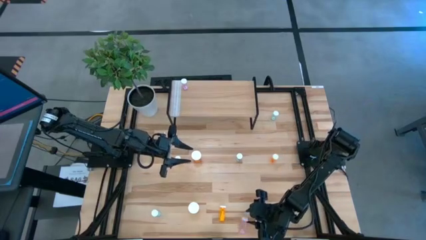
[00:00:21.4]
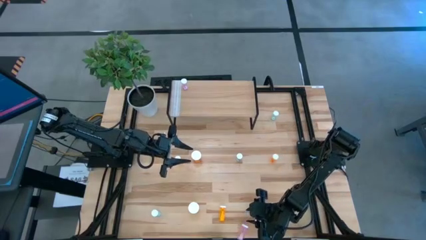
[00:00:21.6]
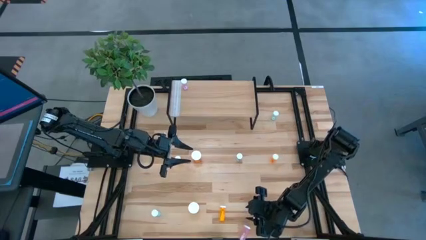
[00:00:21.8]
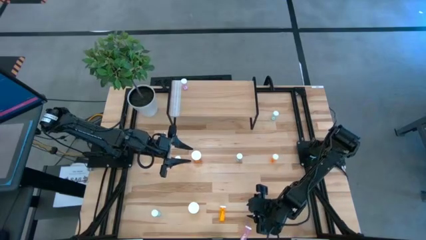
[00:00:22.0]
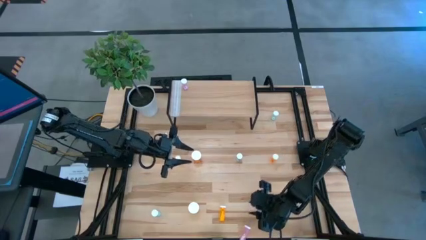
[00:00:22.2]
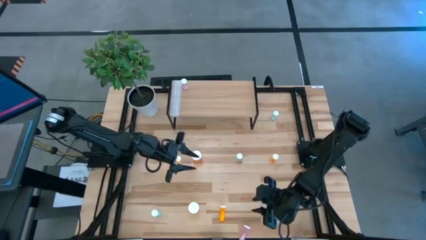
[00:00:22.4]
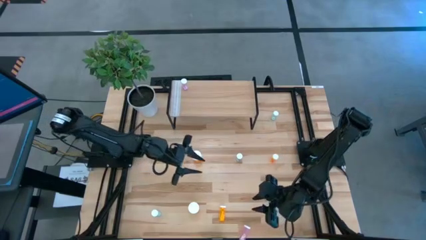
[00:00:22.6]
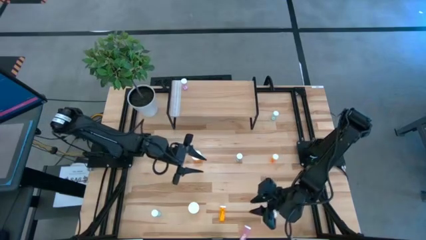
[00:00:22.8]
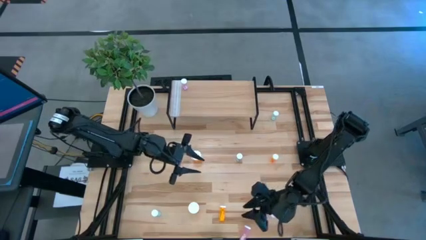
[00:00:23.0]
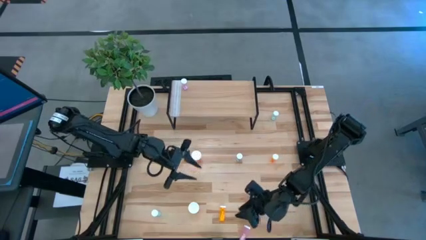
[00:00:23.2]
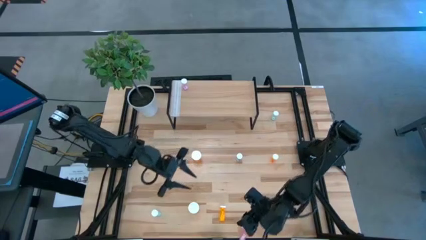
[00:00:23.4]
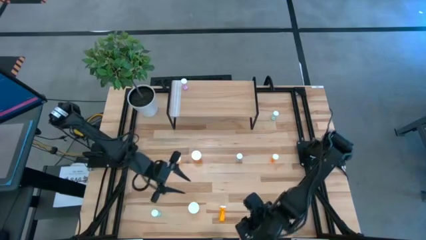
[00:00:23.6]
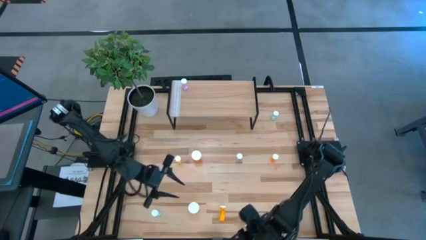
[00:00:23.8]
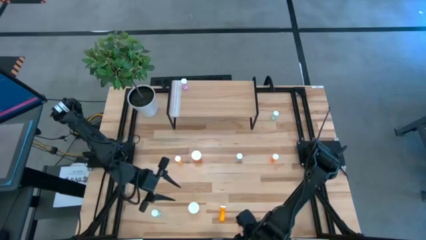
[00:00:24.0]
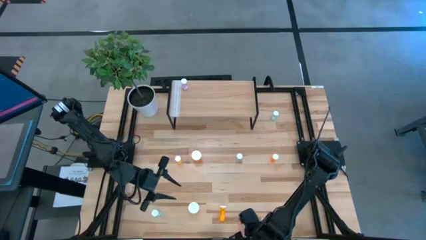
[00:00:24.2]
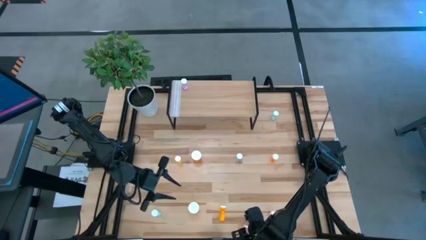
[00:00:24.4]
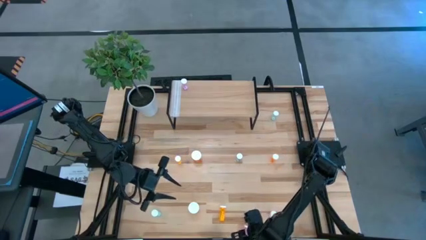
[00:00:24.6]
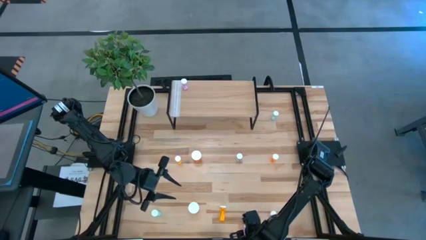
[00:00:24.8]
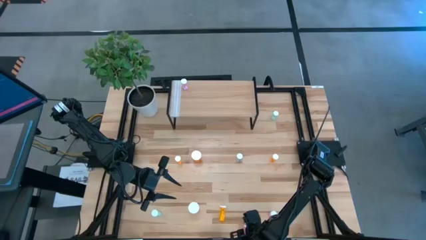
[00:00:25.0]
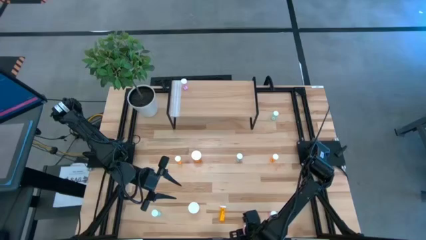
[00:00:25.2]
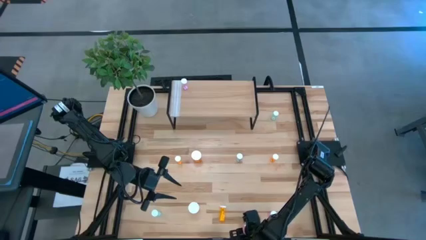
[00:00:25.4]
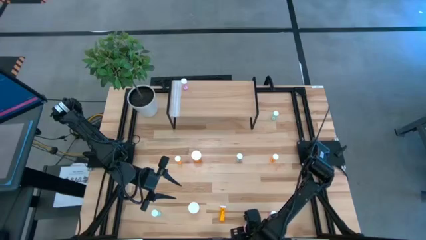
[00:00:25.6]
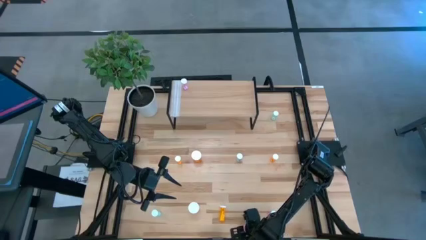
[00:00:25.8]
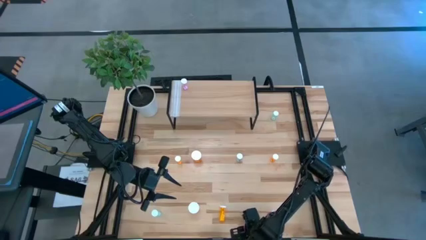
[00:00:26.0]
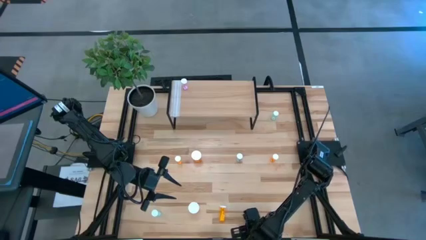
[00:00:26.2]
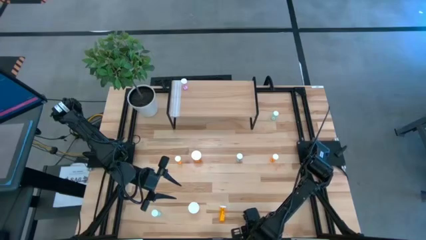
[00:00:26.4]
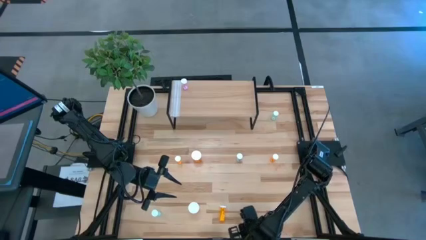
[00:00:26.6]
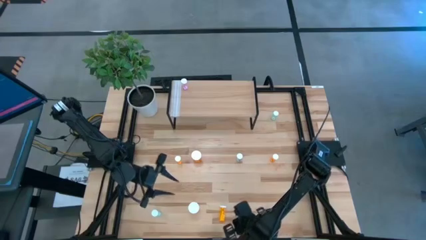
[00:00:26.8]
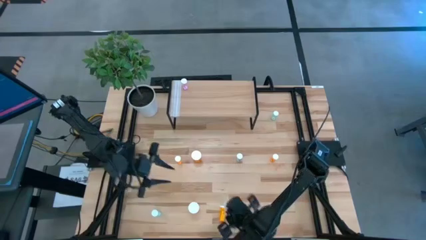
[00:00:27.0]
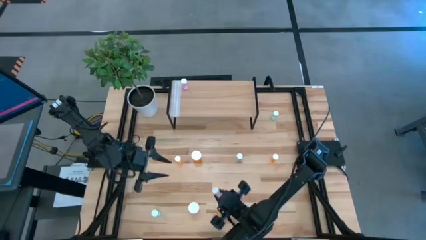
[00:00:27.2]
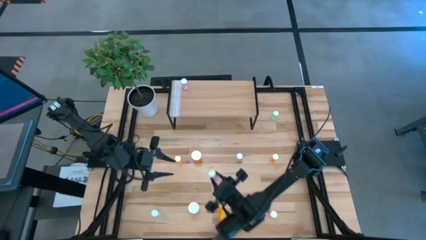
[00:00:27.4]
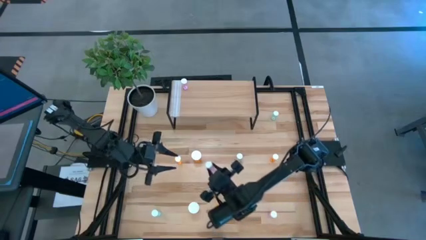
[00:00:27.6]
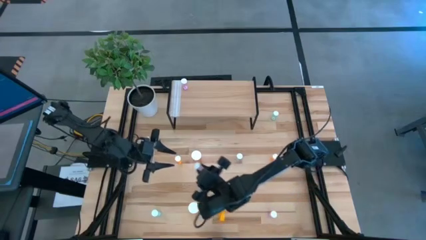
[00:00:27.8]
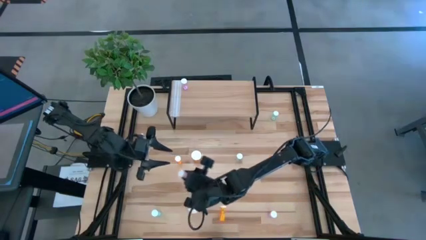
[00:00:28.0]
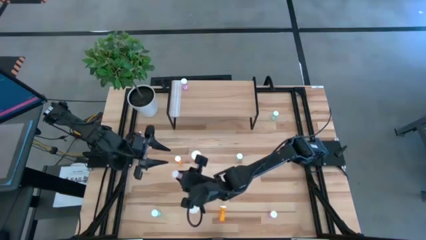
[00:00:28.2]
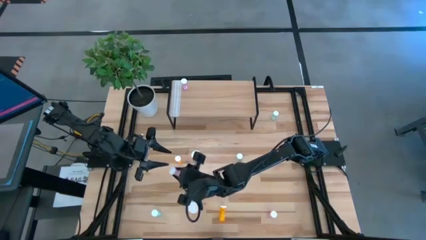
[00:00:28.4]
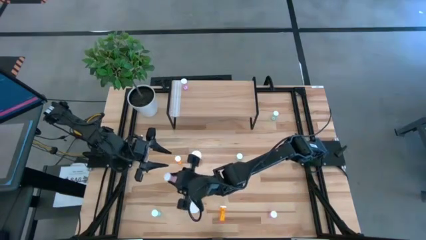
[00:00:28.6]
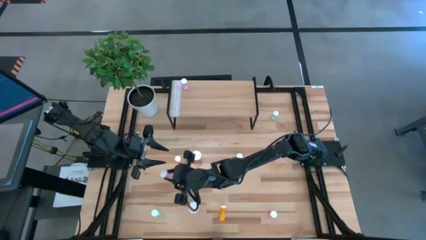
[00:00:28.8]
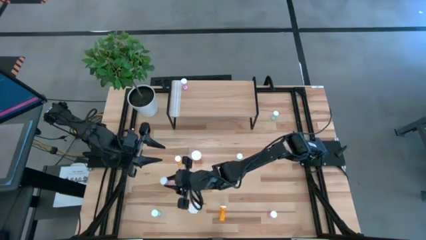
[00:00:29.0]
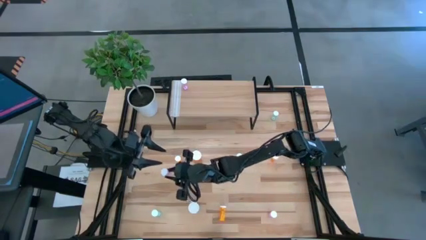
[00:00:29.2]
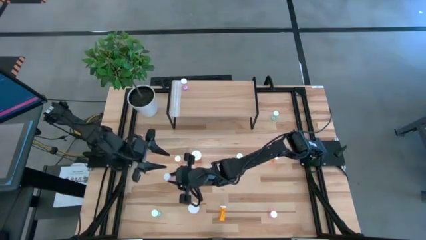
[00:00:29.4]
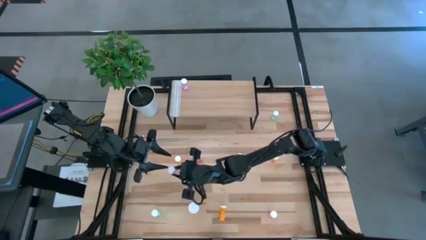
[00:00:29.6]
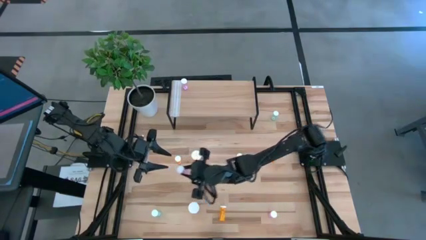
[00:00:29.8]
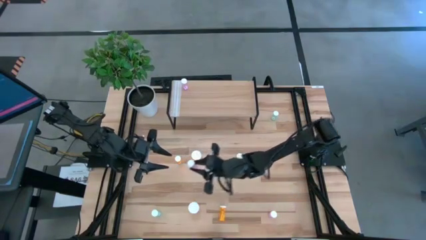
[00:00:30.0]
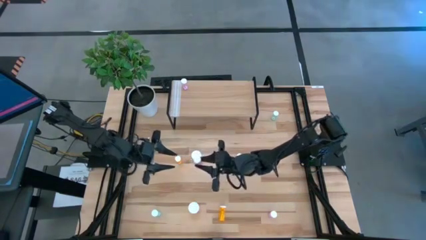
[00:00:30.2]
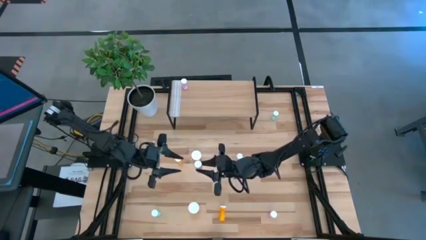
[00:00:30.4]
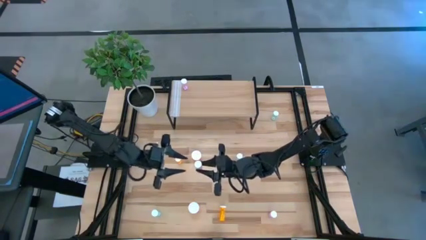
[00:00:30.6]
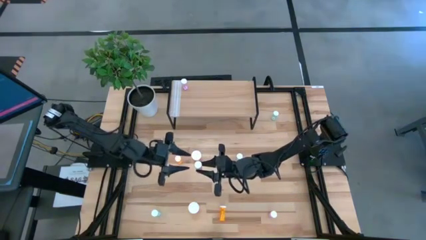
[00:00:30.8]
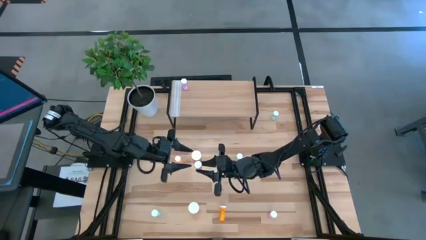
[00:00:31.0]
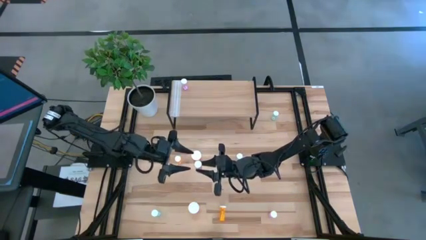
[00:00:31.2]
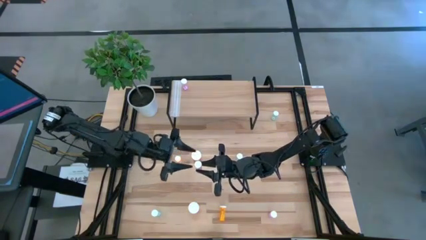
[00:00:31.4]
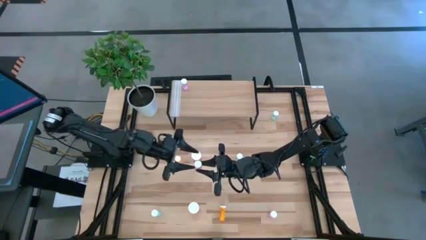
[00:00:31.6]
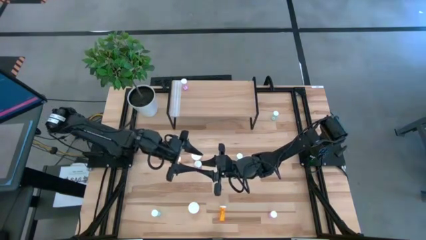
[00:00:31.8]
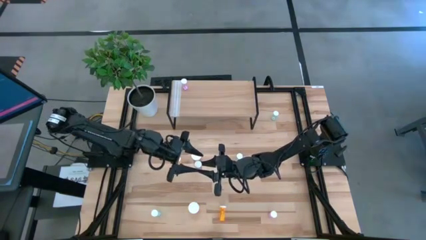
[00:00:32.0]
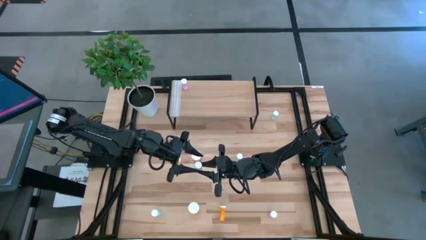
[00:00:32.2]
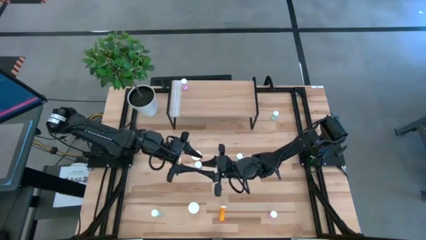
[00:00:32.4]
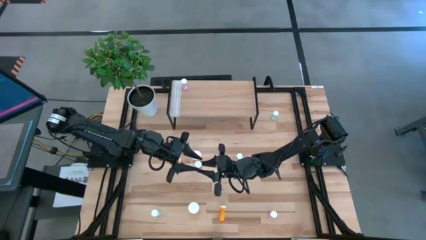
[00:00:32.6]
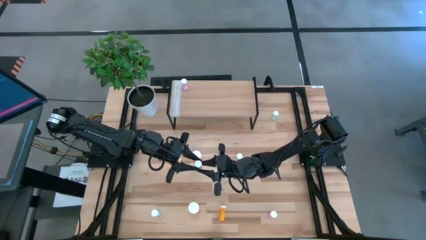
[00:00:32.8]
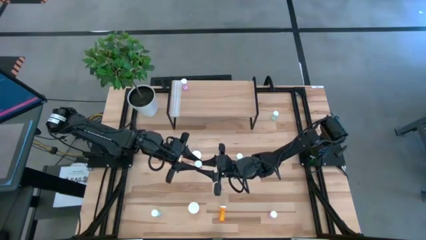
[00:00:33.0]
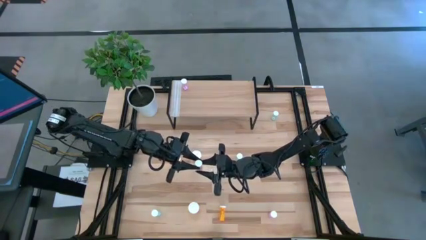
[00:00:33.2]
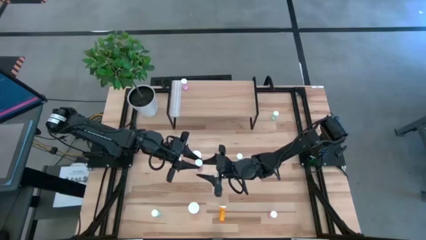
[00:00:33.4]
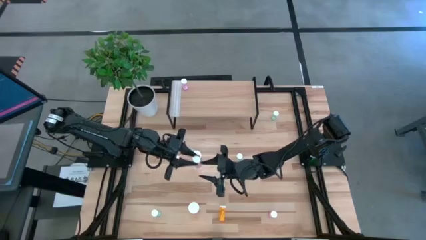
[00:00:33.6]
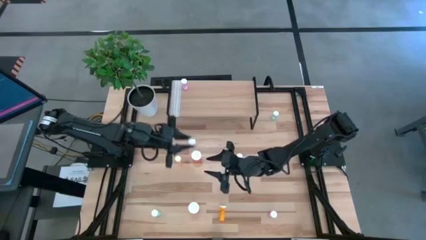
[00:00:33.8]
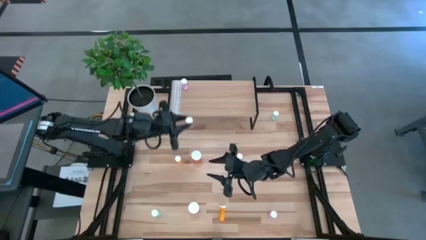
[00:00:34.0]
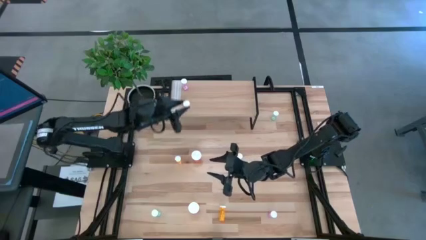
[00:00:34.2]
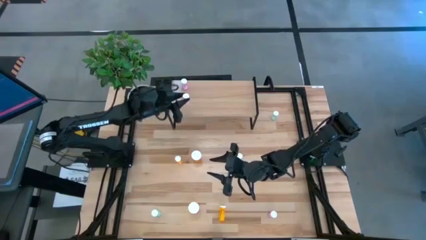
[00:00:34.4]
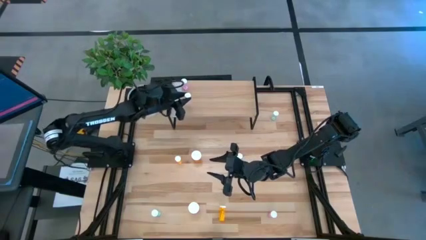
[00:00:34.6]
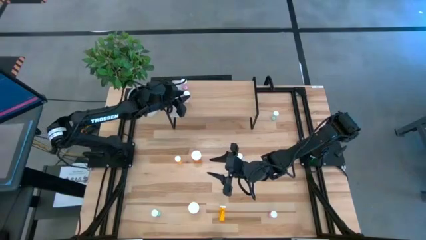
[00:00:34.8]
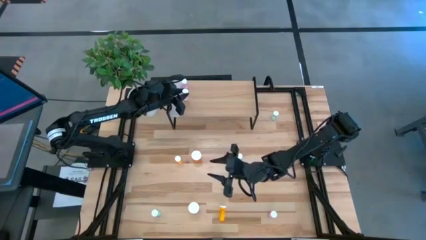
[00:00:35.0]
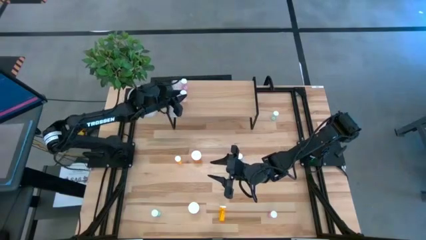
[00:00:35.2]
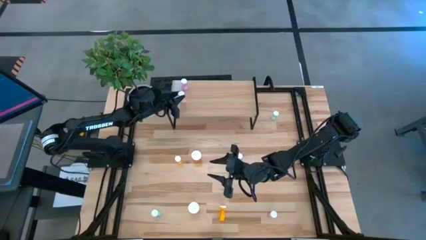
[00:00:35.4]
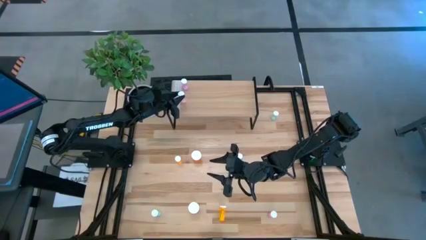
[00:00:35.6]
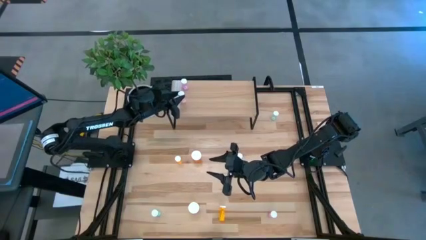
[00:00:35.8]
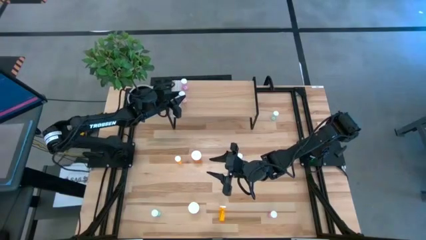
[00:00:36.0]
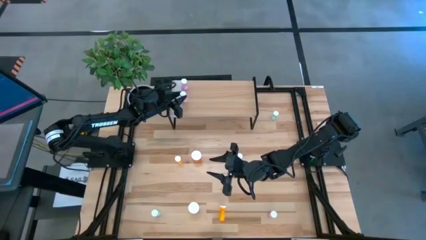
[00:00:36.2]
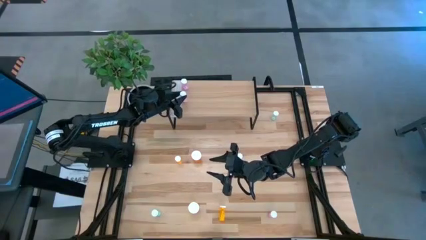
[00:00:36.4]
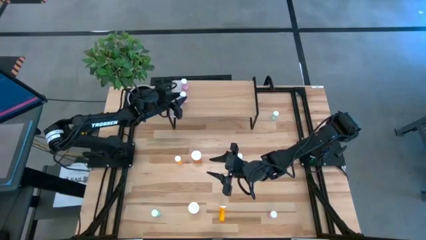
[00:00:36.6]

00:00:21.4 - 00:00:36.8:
Task: Pick and place medicine bottles onto shelf by color
Put the left pink pill bottle on the shelf aligned with the other pink pill bottle
